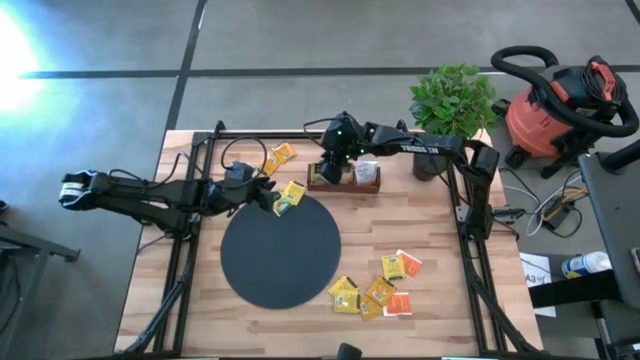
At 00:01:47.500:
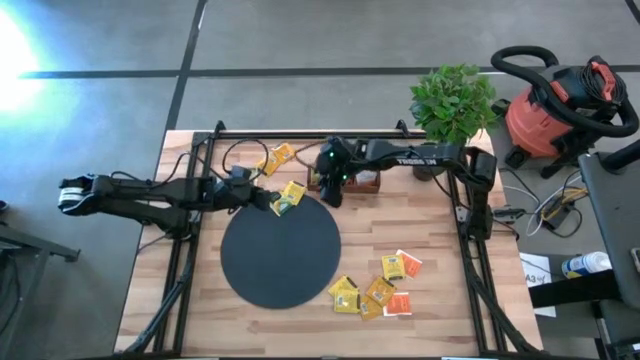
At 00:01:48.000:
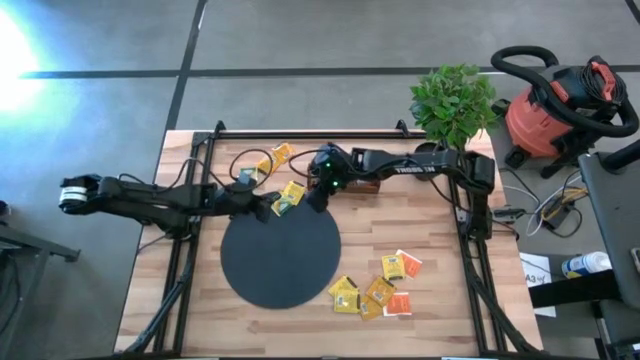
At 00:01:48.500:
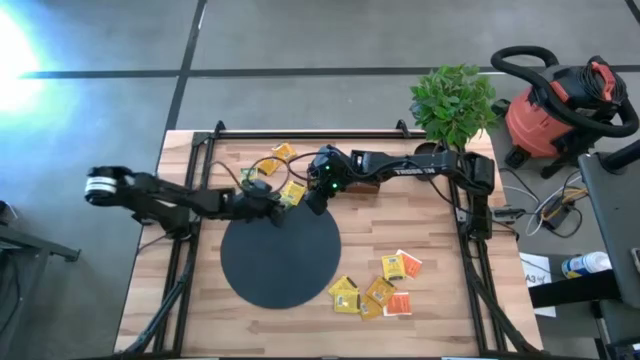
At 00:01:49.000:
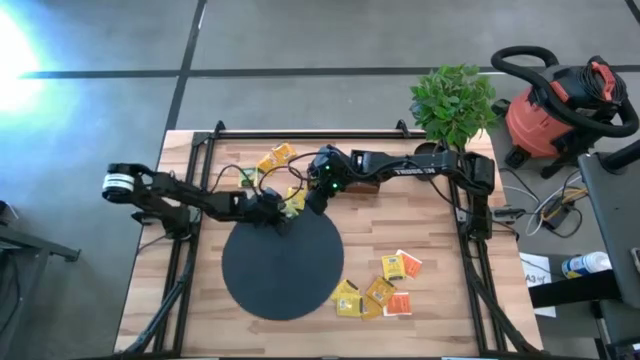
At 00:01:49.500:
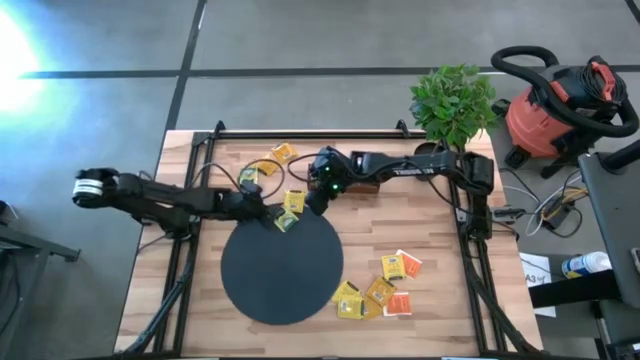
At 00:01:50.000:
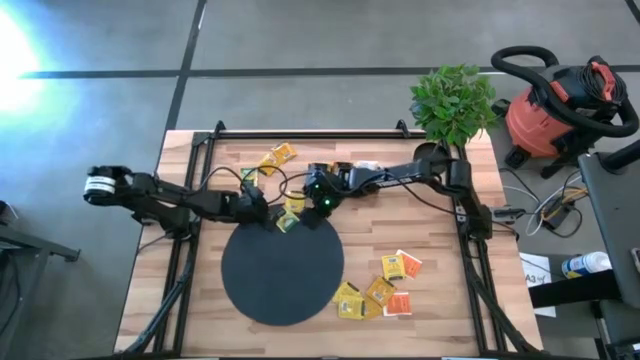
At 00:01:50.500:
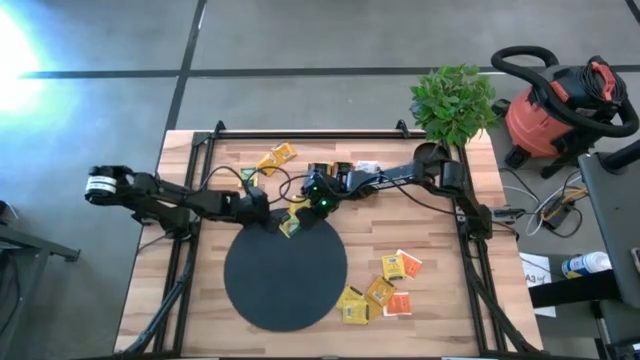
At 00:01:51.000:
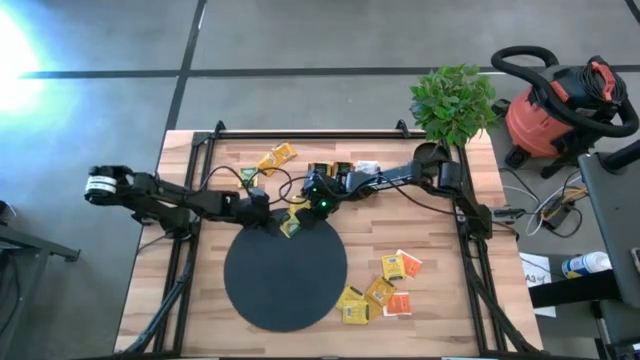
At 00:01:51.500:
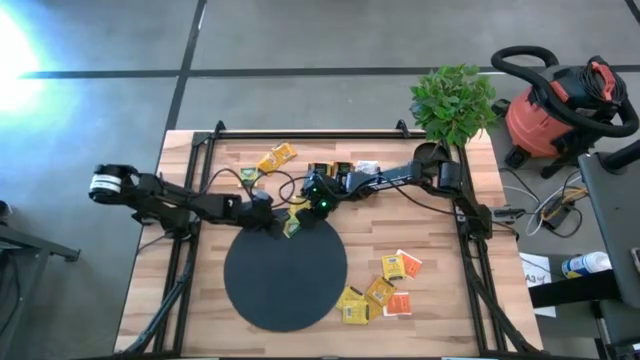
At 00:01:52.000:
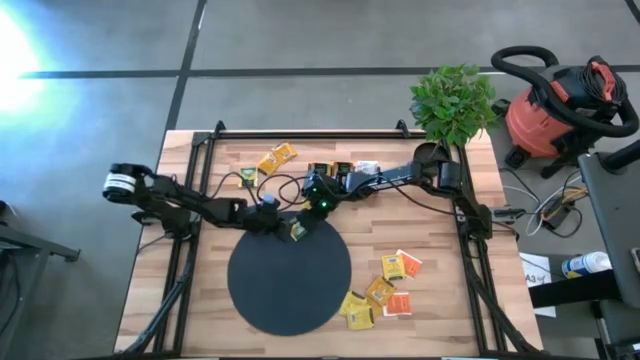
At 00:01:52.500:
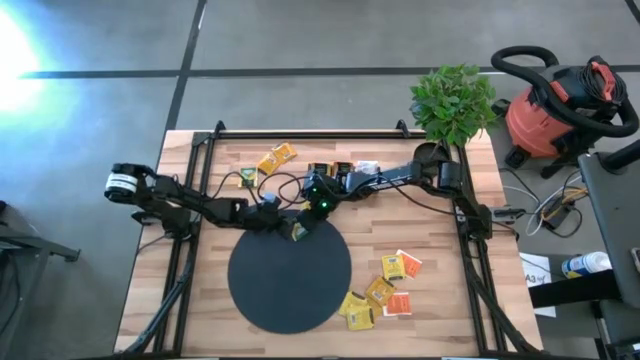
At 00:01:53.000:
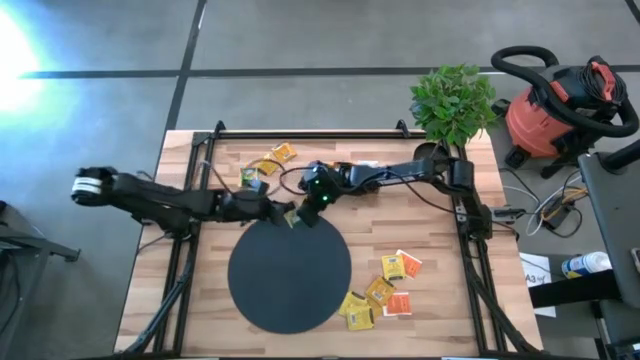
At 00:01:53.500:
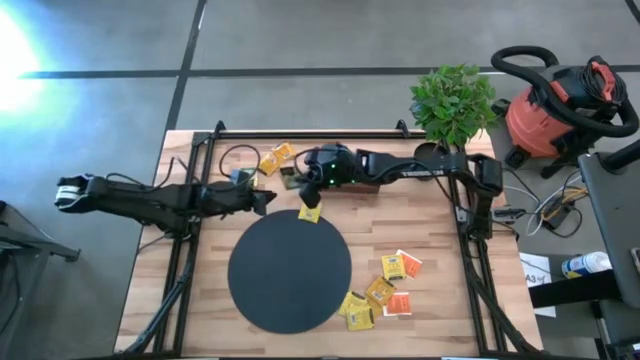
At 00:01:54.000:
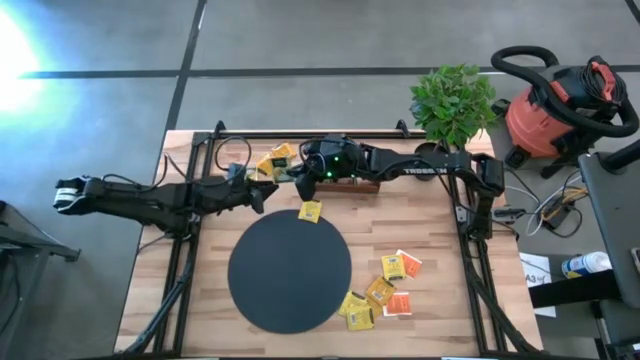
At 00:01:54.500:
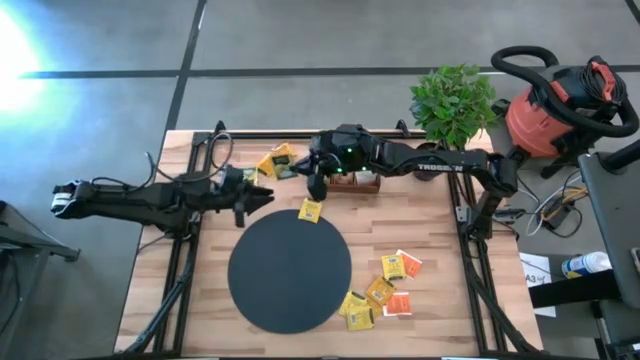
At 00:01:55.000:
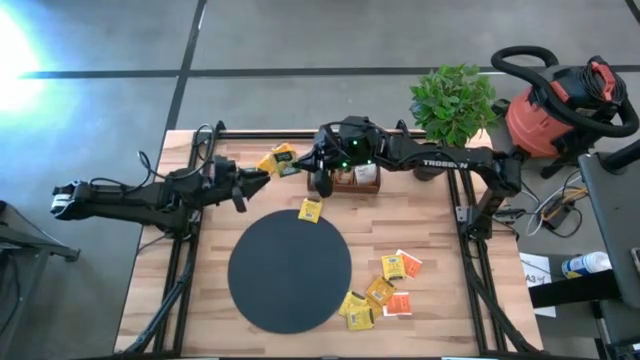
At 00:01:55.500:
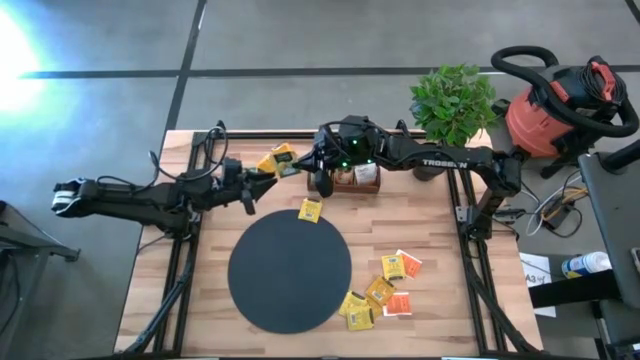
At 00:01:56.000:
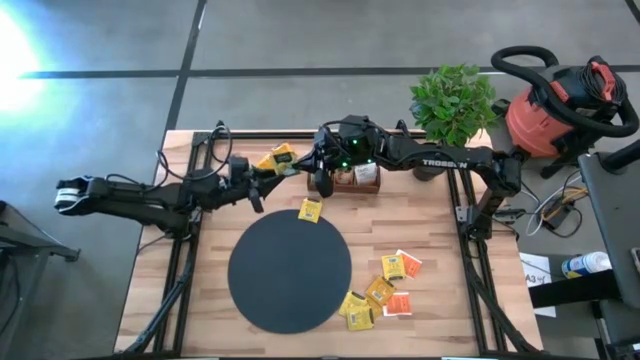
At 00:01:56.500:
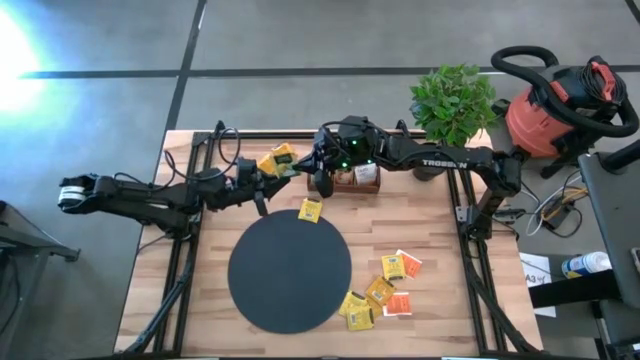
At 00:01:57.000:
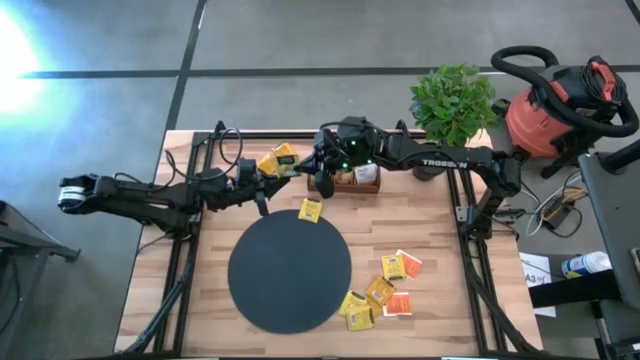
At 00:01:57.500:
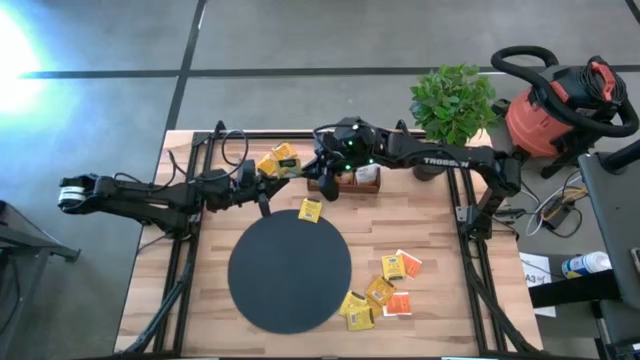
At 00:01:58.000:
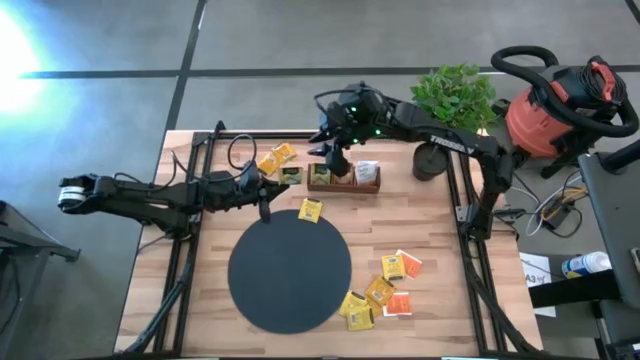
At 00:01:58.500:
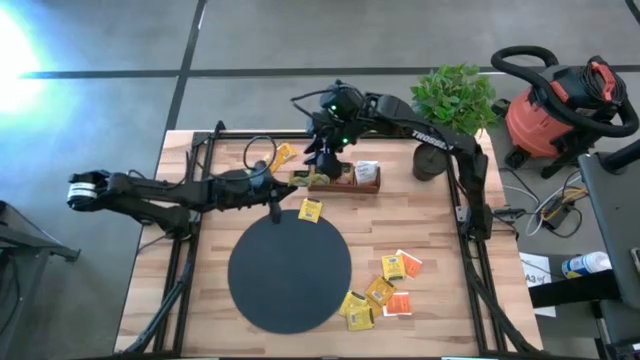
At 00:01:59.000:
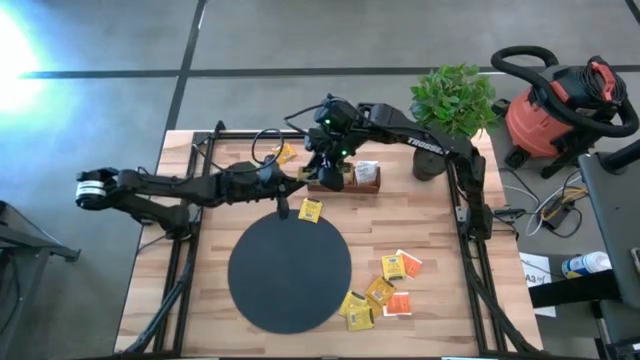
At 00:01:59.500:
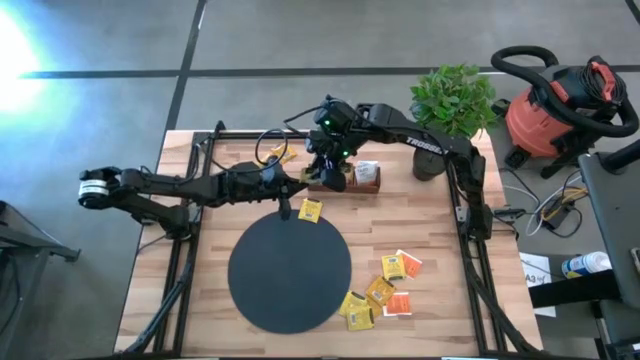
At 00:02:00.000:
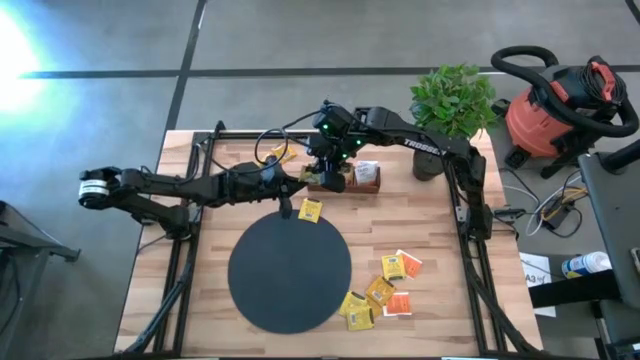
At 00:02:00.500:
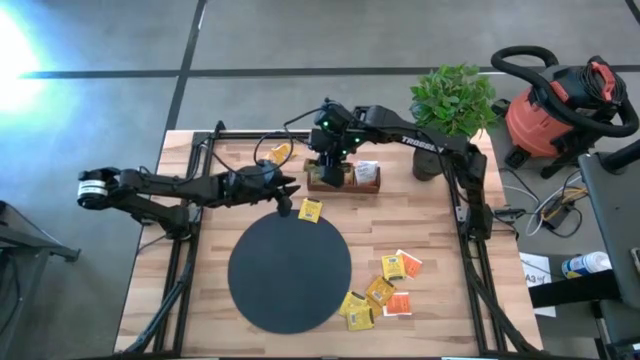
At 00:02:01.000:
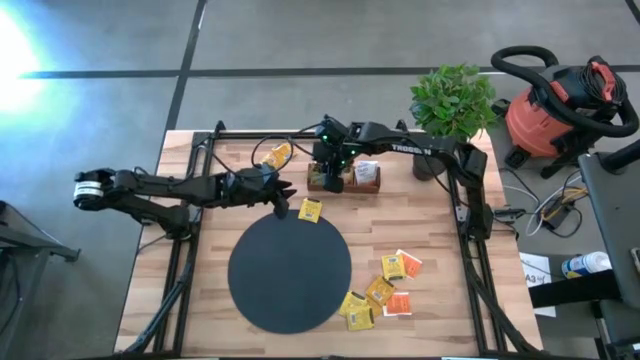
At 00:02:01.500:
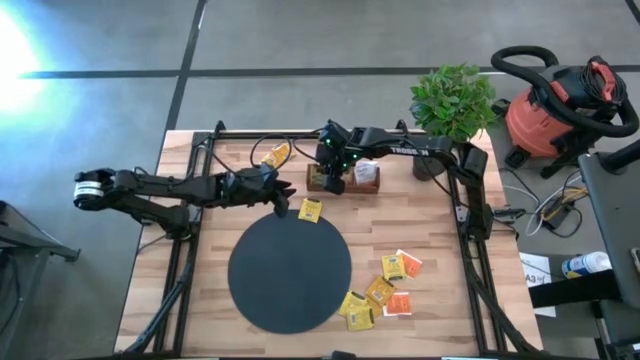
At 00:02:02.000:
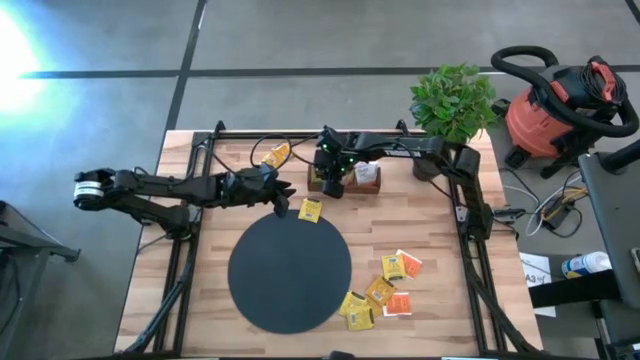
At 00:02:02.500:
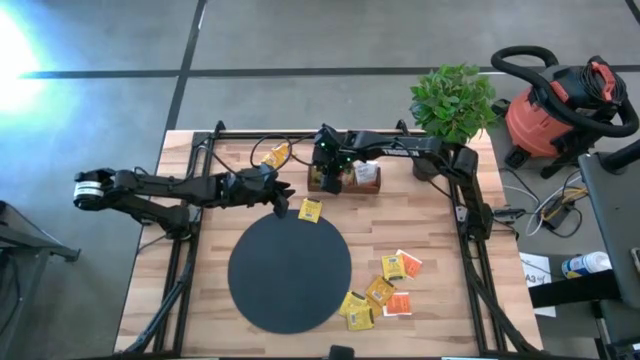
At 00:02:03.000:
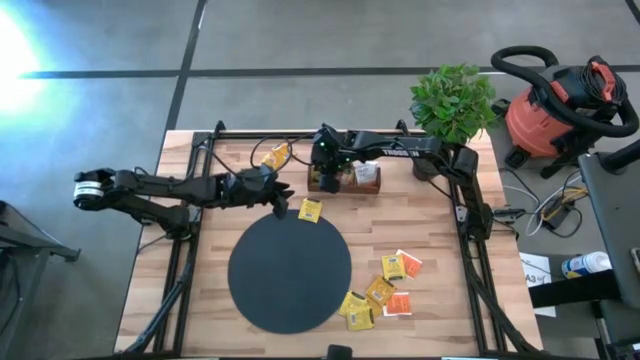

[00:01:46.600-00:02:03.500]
Task: Pick & Place Tea
Put the yellow tea bag into the left section of the wooden organizer
